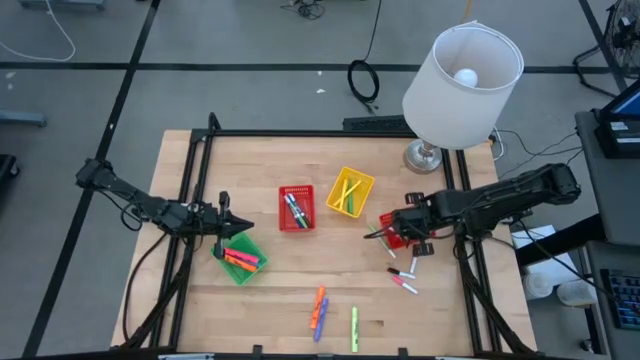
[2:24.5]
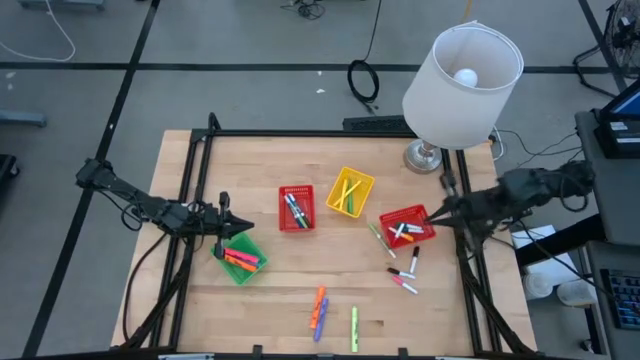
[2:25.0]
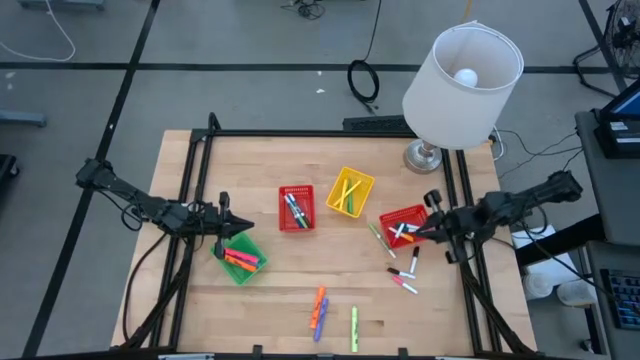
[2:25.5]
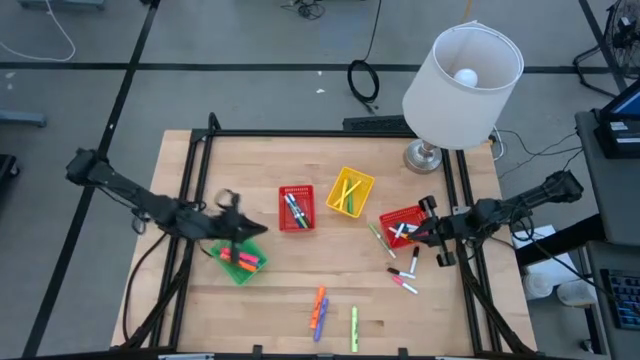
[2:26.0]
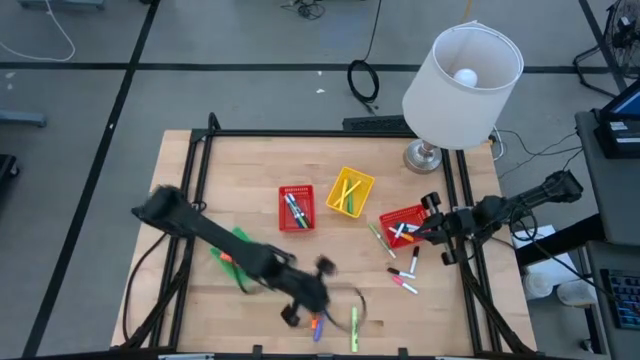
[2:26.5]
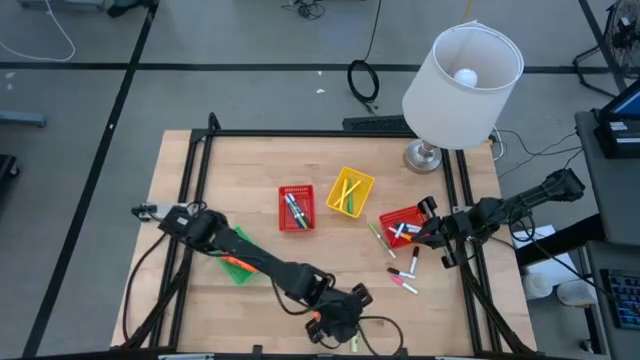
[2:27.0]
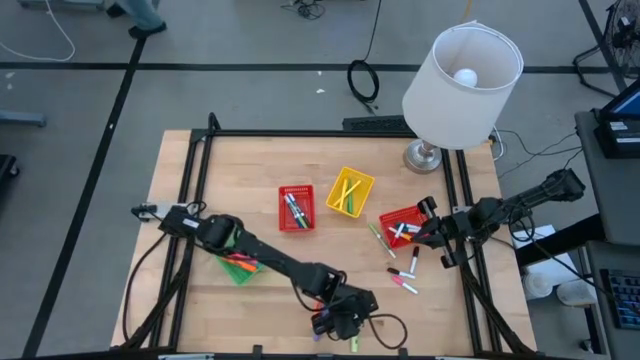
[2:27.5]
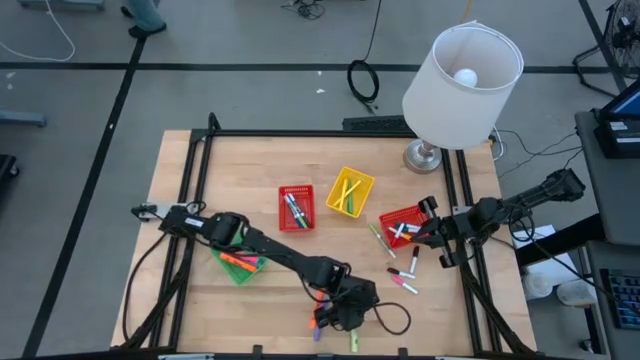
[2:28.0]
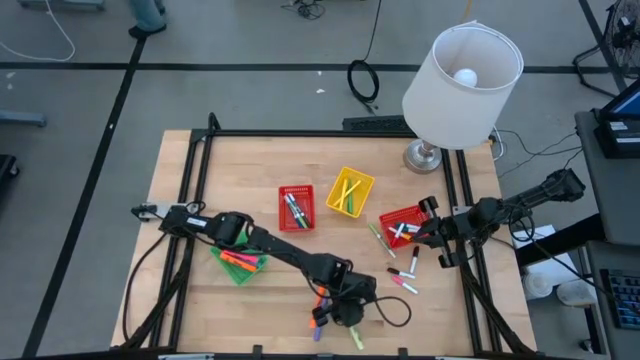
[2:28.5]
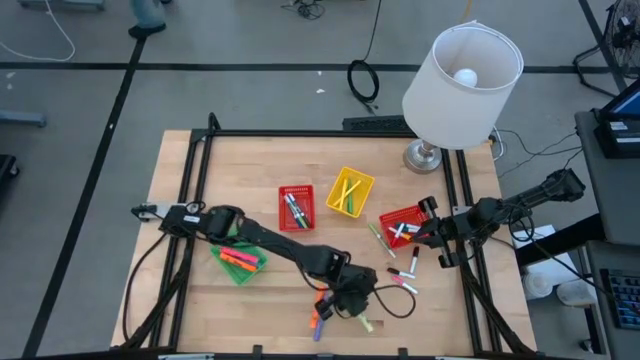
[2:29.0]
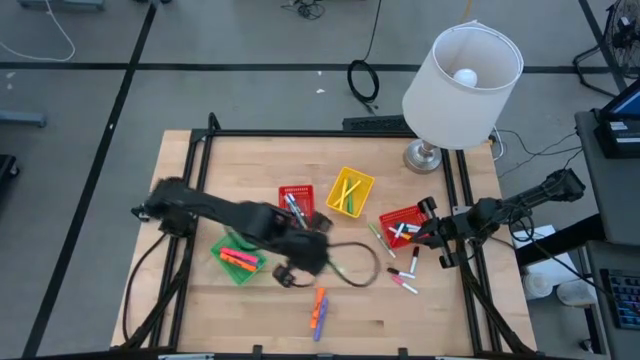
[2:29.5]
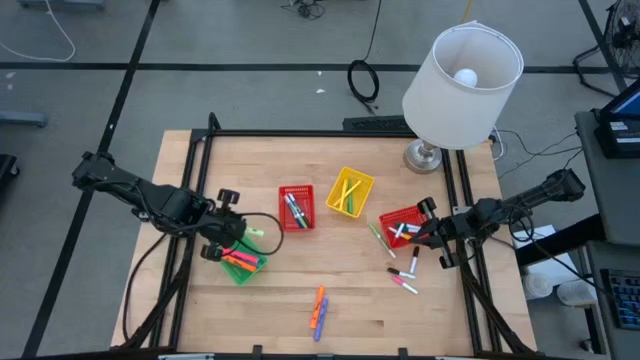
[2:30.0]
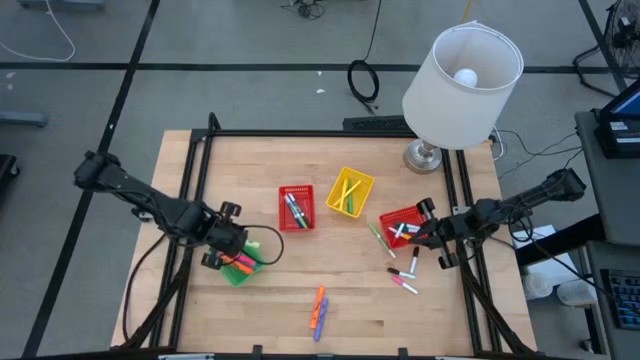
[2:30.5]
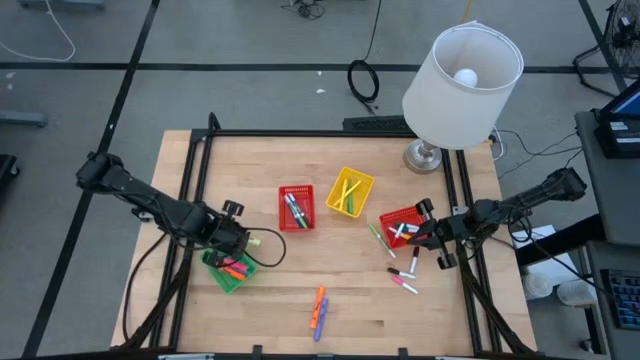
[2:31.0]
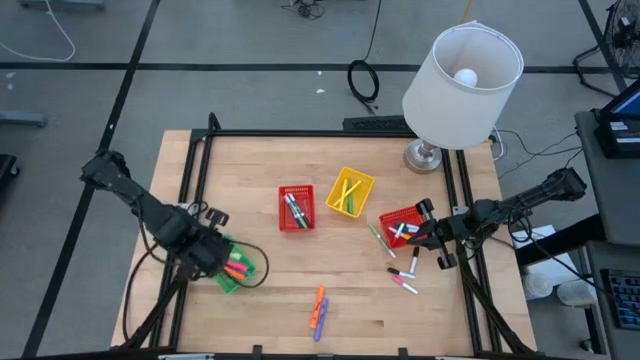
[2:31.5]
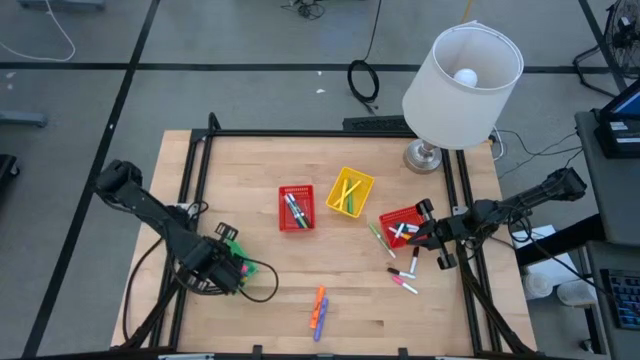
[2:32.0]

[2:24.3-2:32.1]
Task: Pick & Place Markers
Put the large green highlighter pen into the green bin

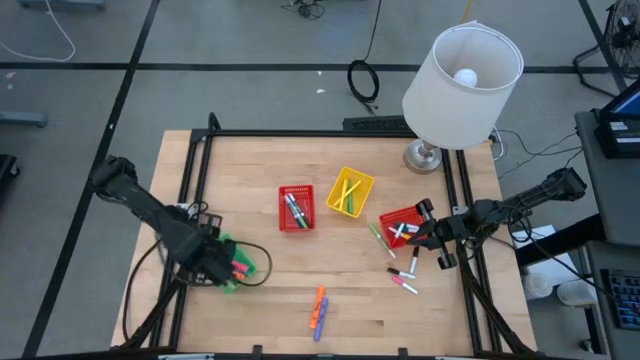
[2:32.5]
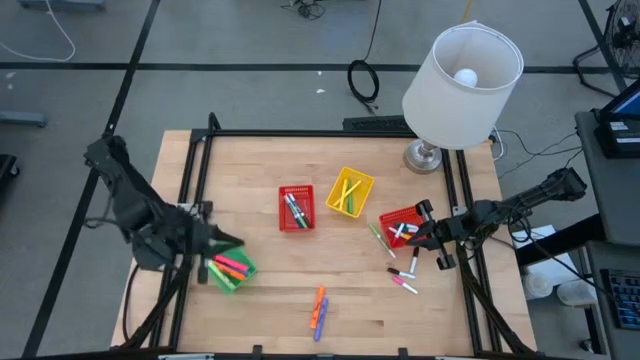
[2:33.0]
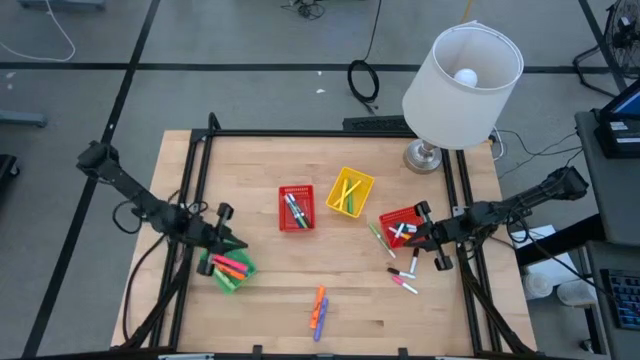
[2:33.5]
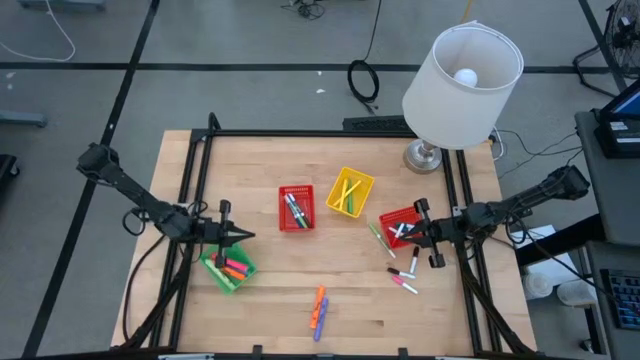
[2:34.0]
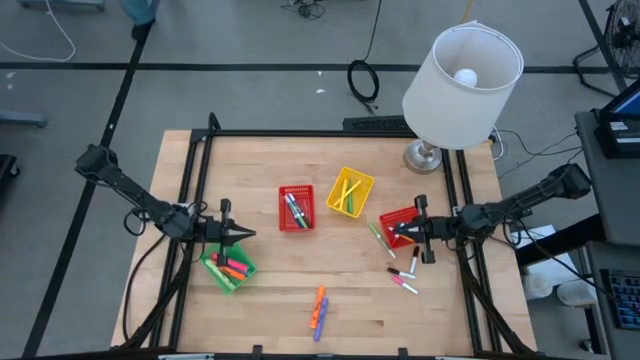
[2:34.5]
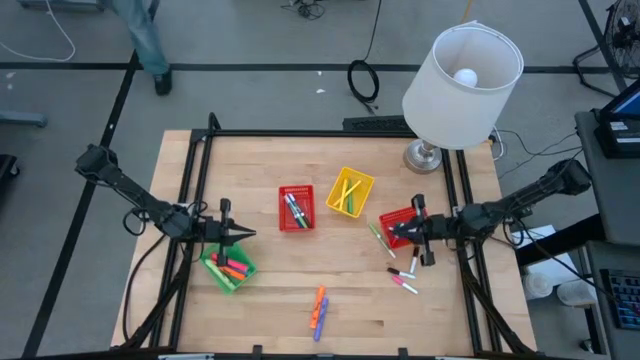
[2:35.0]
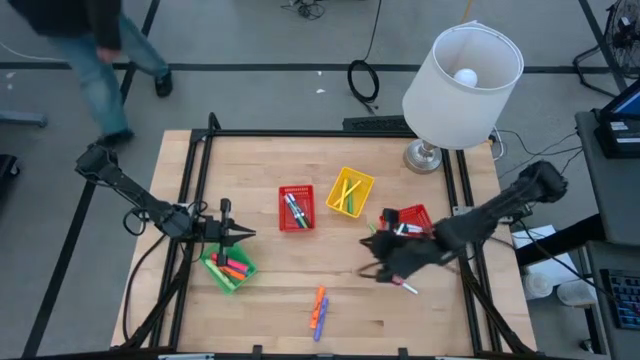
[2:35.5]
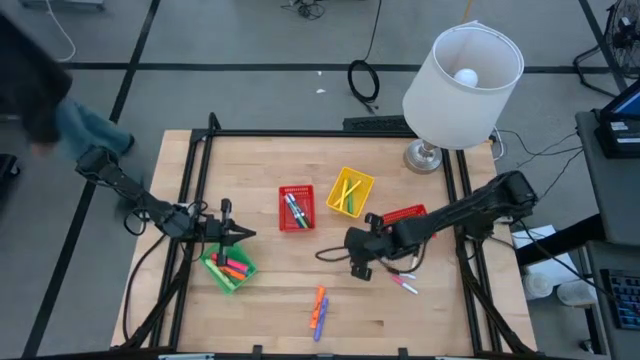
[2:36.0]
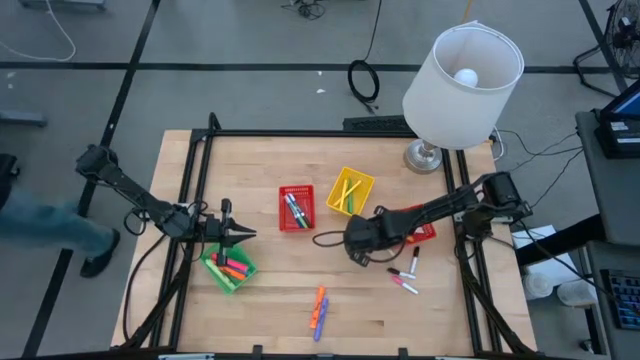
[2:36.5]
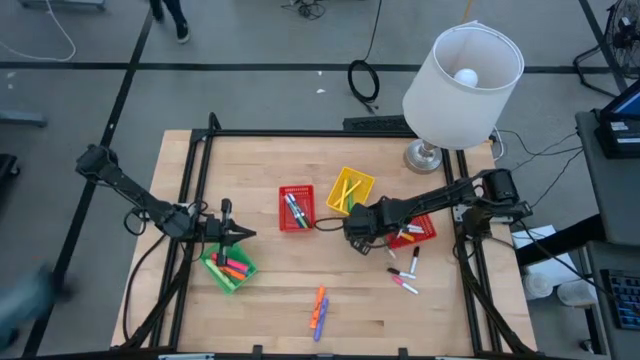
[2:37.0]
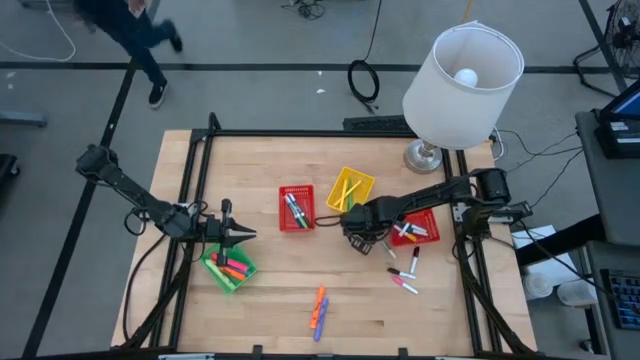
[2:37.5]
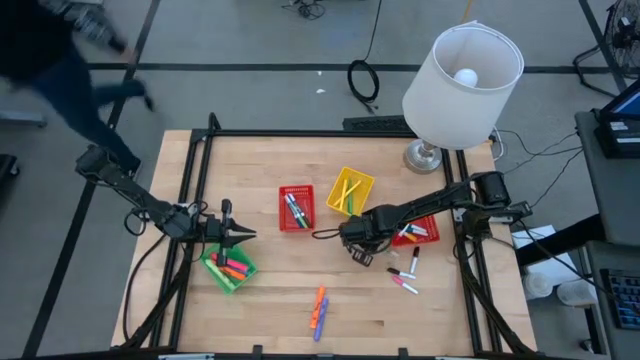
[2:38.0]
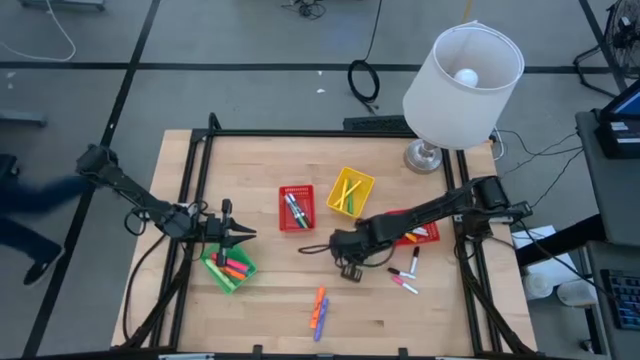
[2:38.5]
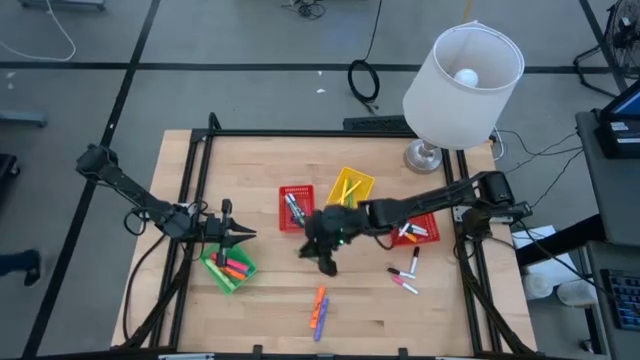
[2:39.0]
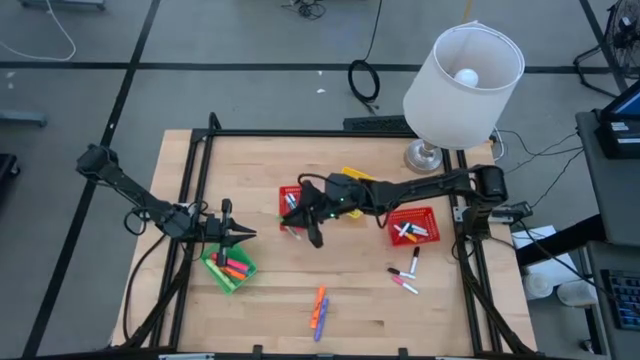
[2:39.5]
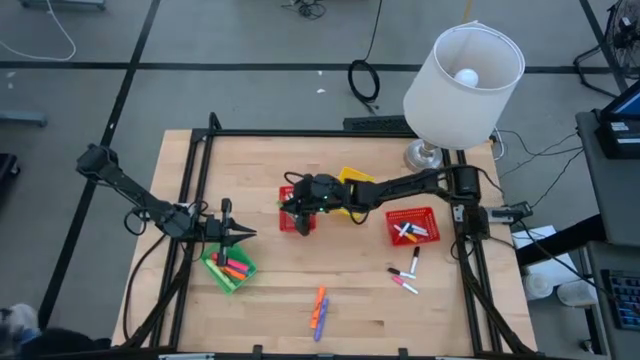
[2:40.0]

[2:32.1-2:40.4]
Put the small green marker pen into the right red bin

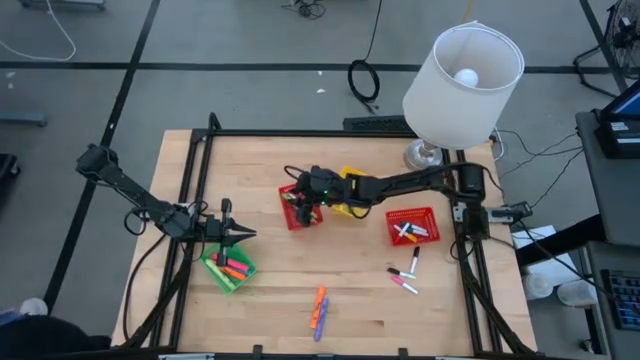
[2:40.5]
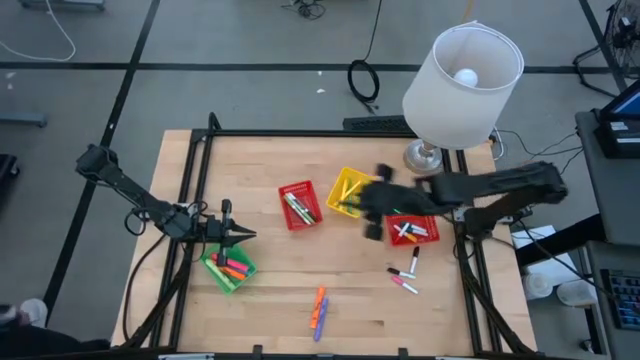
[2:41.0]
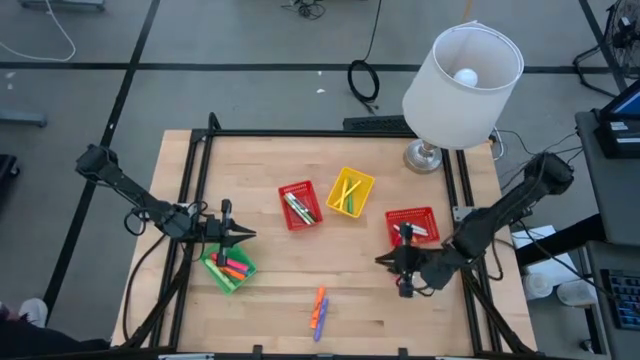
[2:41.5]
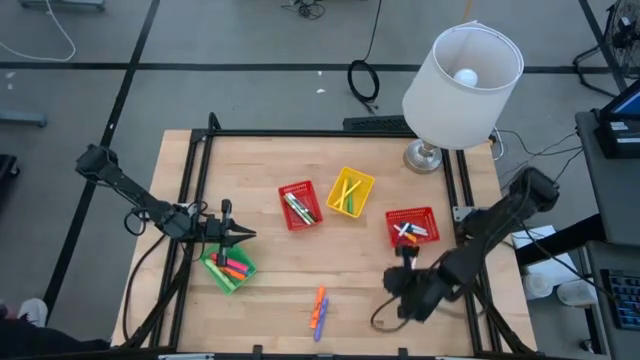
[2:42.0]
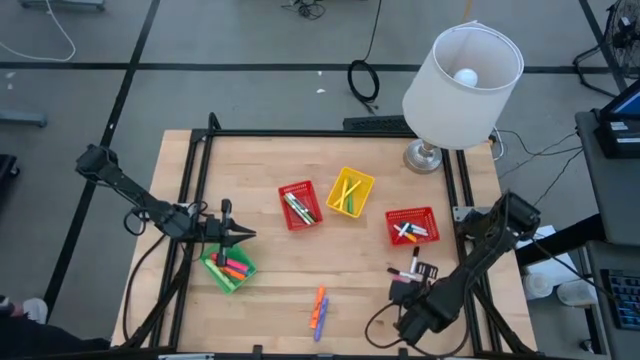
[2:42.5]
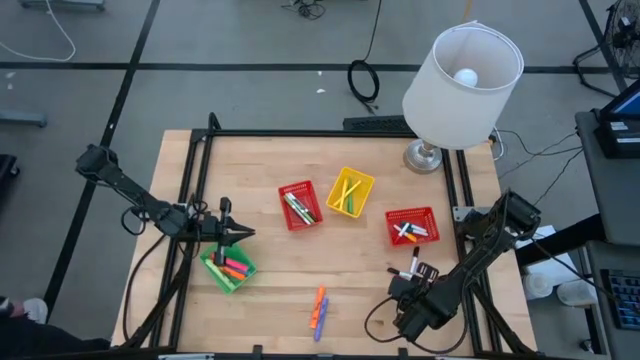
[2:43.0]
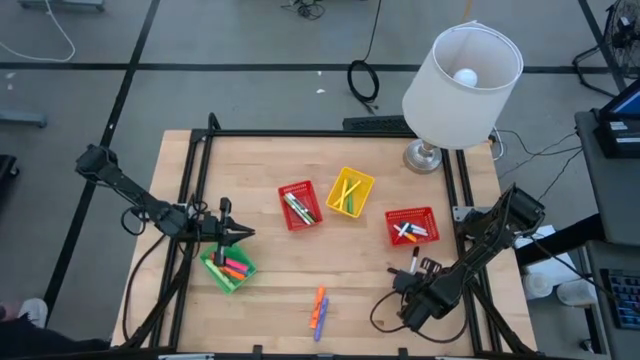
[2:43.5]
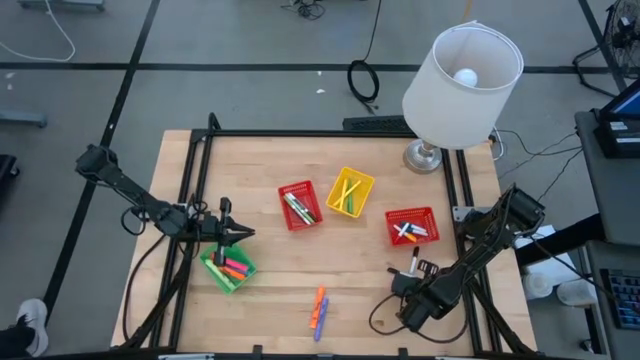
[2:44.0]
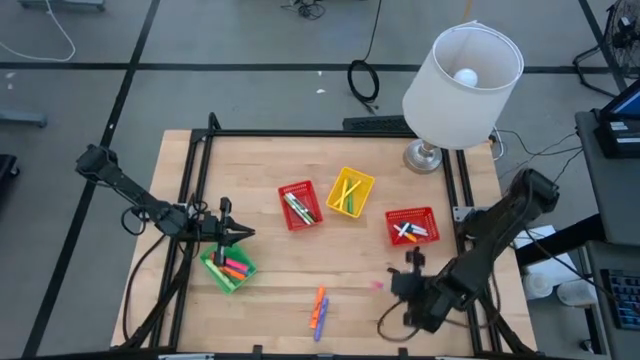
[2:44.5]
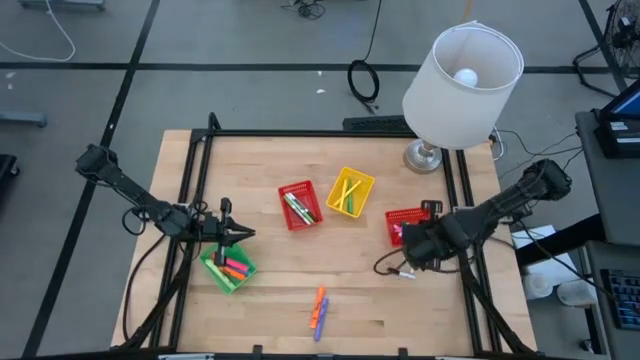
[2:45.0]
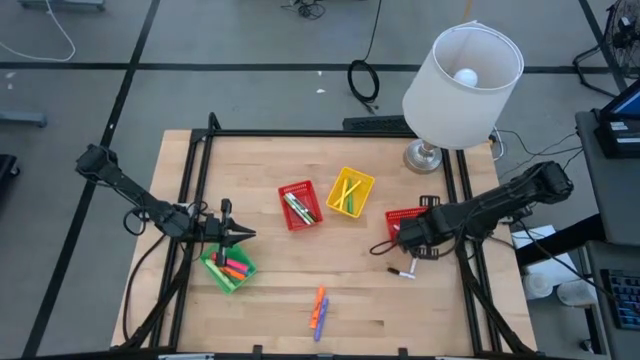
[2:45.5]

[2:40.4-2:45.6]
Put the small pink highlighter pen into the right red bin
